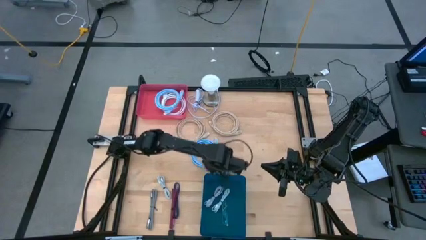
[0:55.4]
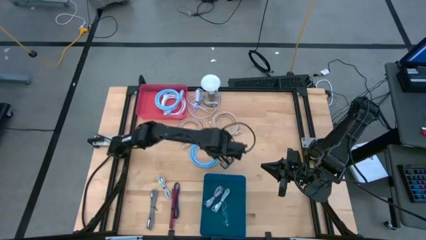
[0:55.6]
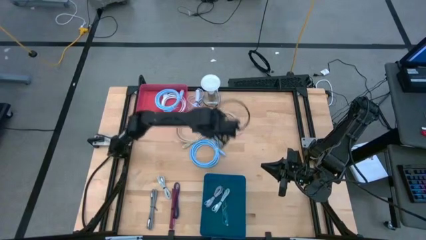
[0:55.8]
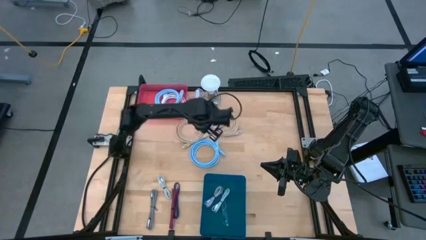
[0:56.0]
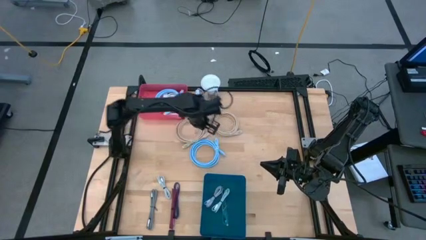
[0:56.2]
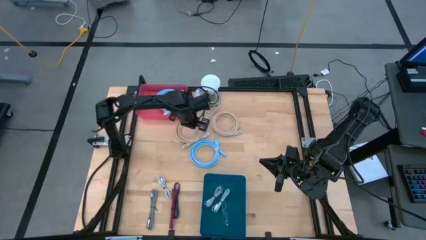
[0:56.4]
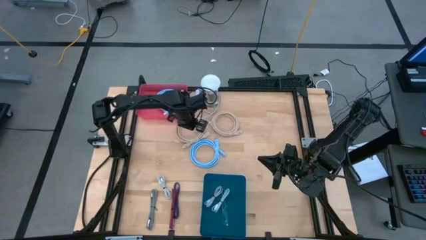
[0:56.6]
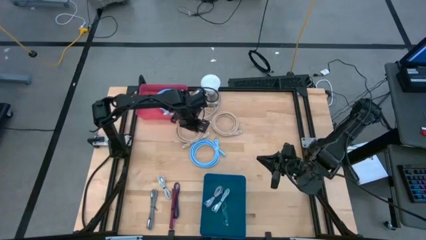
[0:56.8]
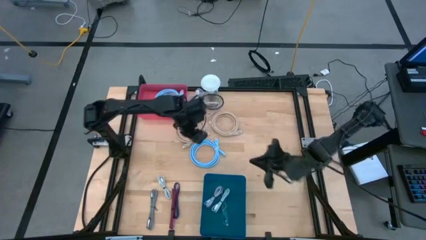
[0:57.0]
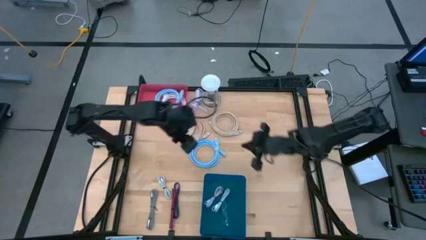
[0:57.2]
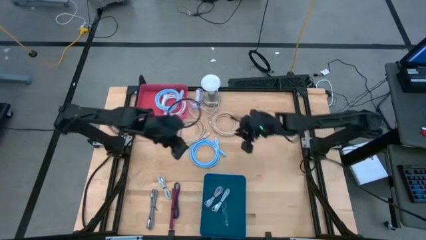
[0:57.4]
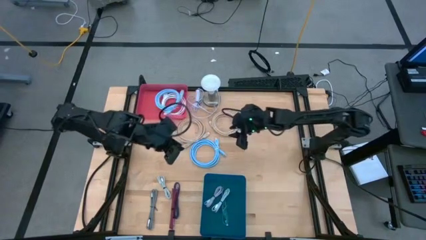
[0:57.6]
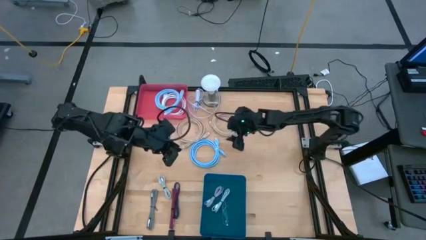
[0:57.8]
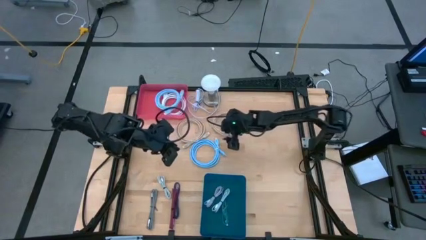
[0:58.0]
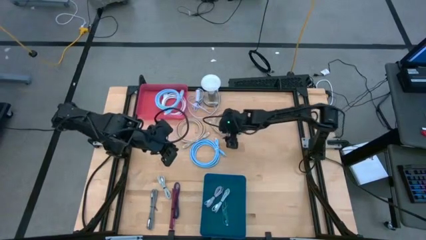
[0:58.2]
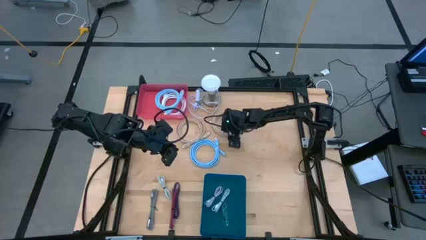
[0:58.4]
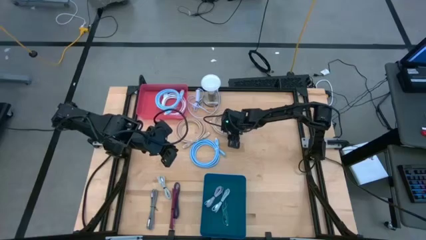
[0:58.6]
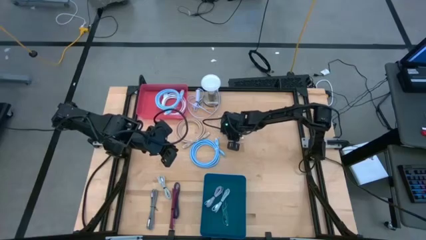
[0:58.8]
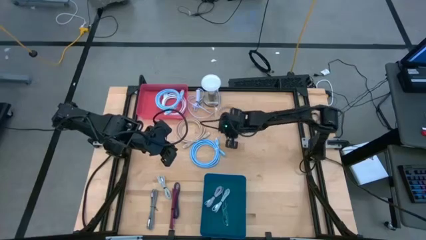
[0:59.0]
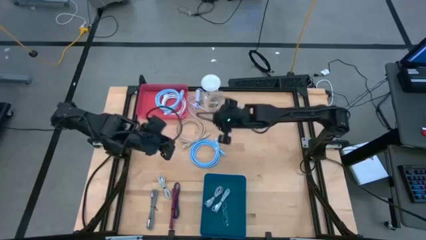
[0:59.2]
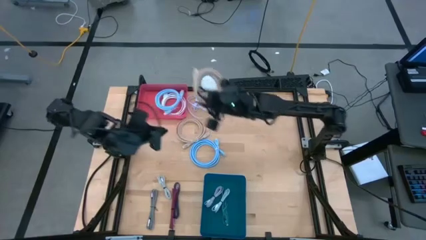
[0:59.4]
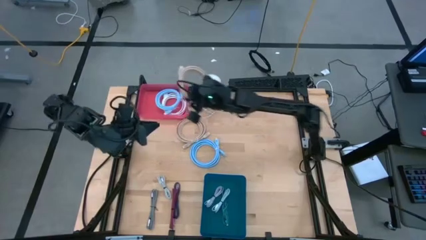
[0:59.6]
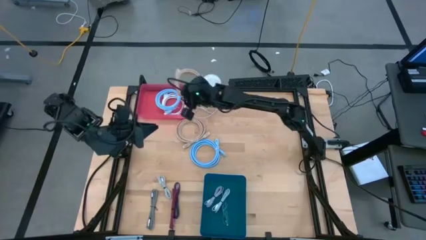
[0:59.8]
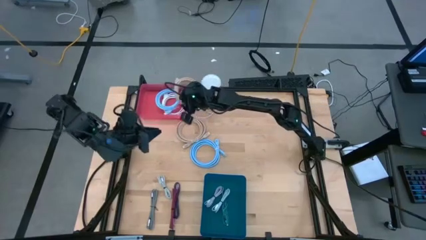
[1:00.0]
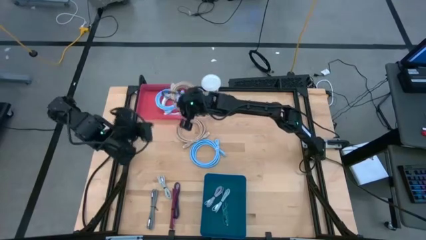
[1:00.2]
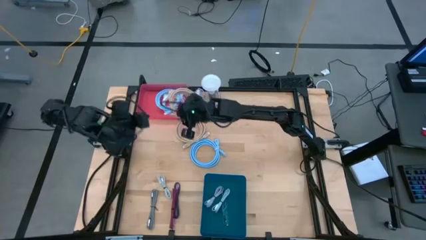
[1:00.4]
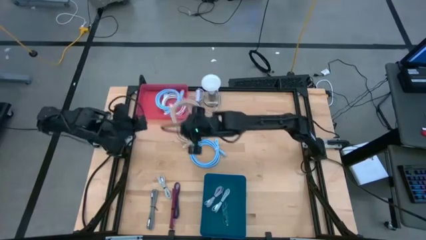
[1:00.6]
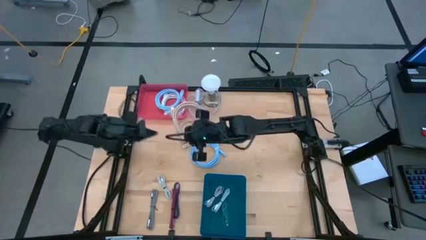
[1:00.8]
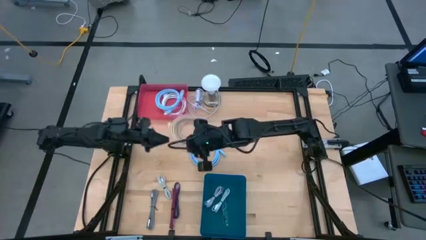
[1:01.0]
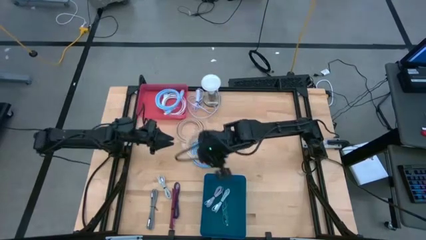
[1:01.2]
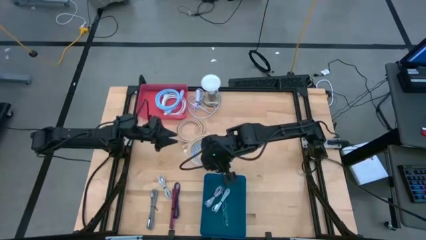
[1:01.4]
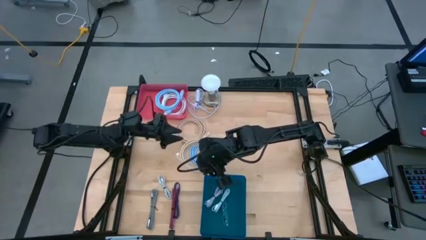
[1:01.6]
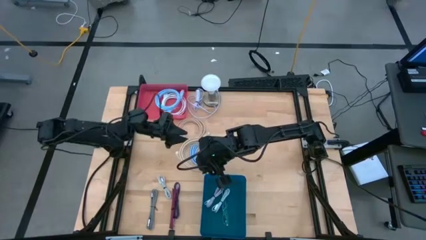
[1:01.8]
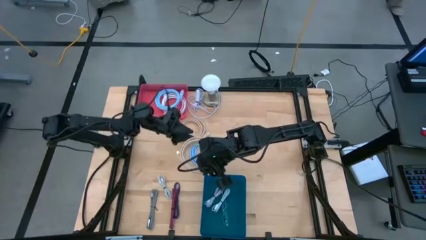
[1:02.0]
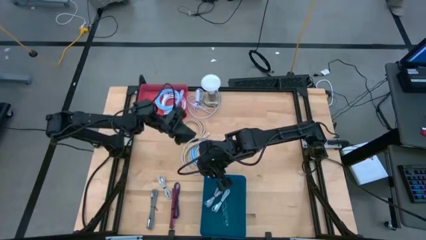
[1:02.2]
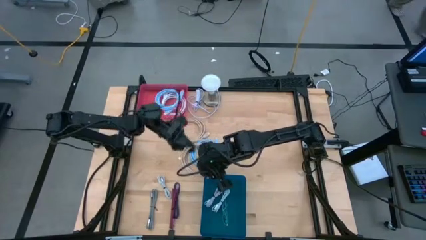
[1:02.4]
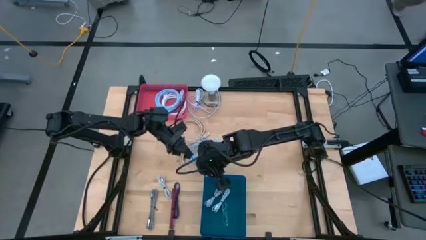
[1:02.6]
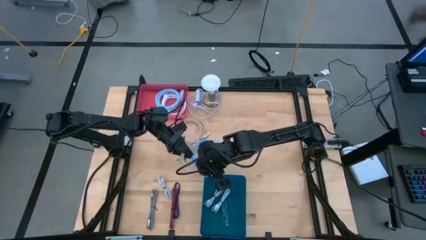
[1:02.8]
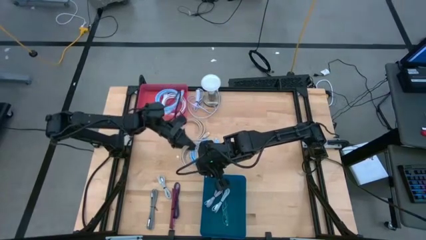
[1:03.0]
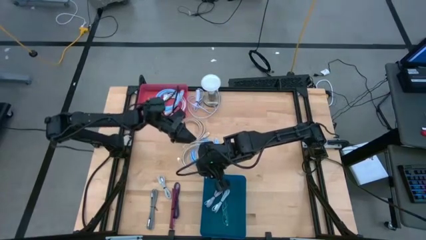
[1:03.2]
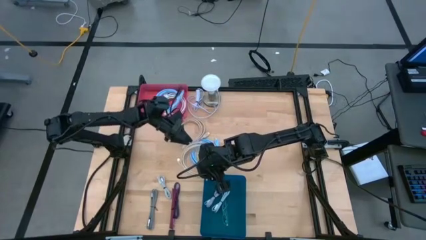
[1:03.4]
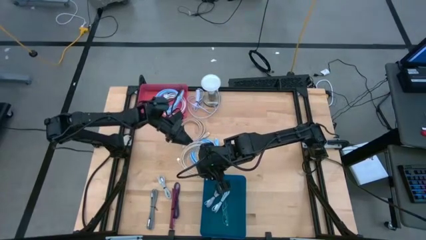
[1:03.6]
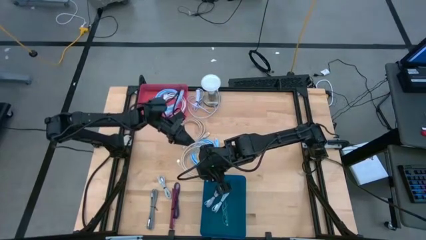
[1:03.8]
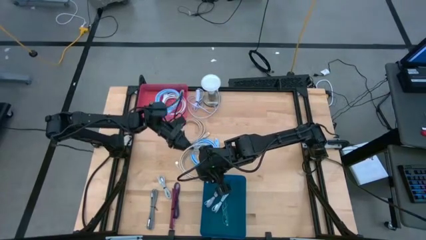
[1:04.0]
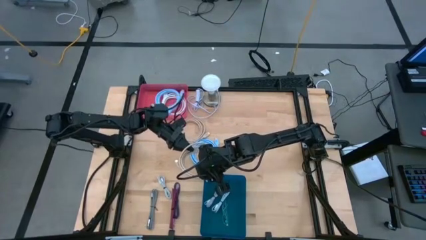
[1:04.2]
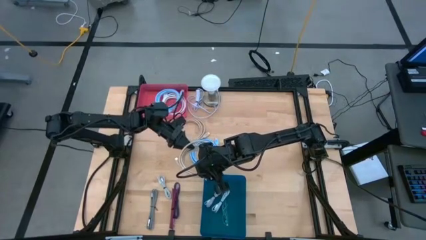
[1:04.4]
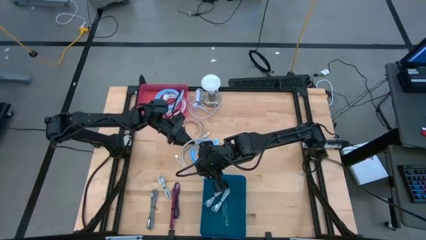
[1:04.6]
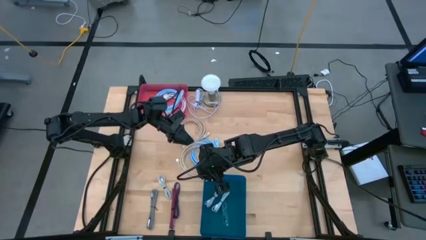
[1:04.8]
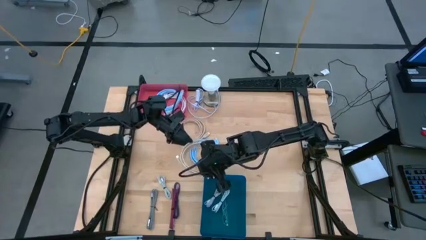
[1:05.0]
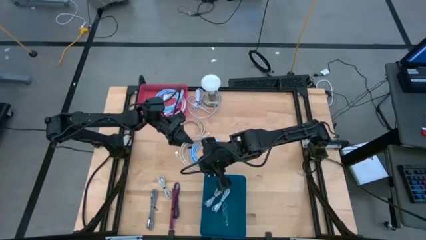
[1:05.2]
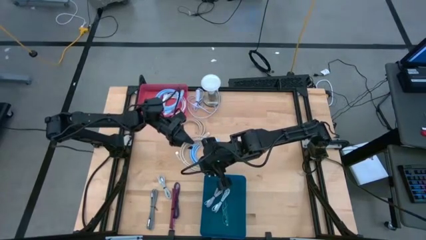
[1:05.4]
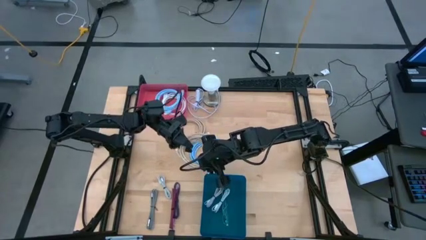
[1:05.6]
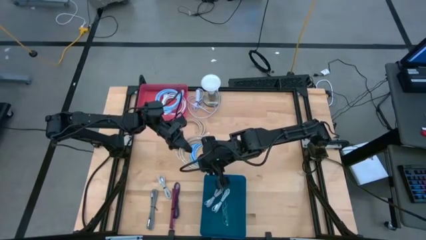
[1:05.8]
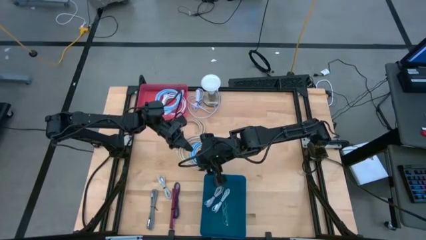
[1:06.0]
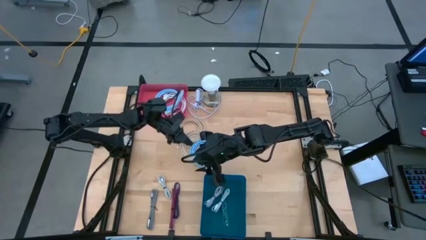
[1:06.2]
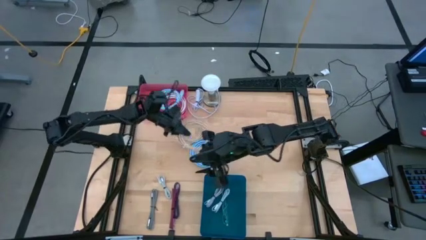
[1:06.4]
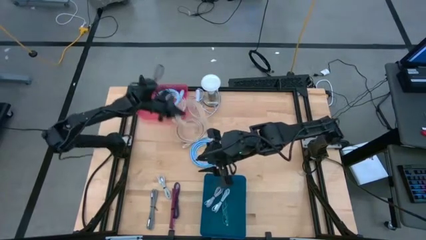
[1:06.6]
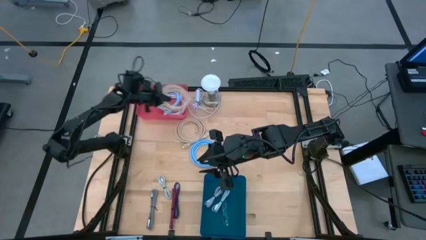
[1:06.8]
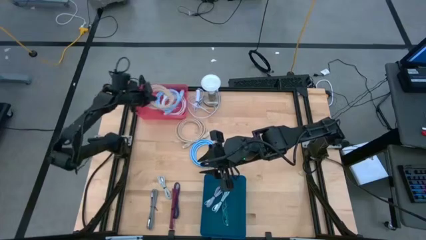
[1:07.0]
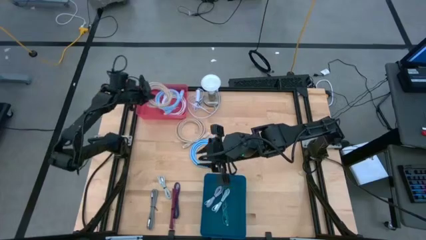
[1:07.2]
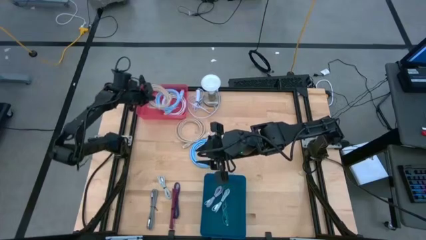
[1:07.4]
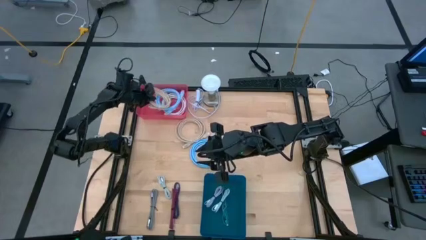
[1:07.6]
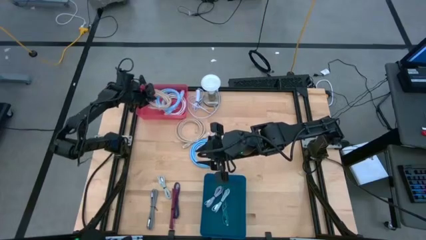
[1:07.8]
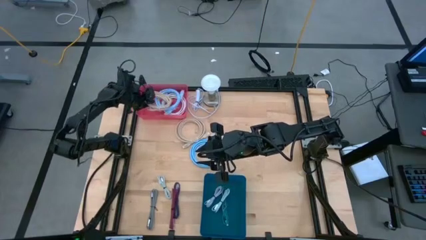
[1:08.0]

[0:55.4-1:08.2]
Task: Pick & Place USB Port
Put the right brown HDMI cable into the red bin

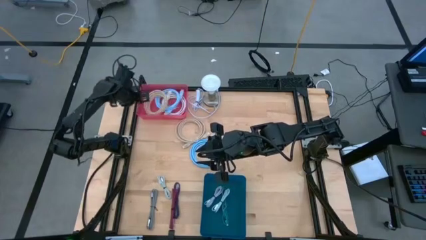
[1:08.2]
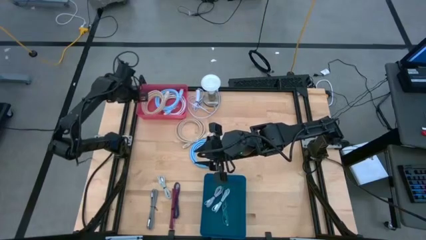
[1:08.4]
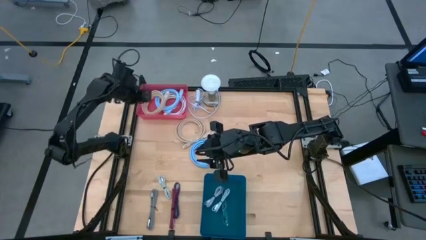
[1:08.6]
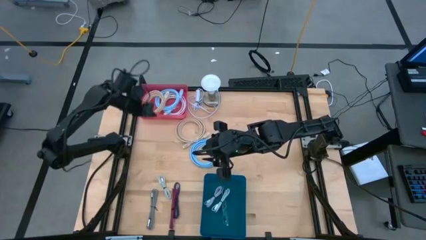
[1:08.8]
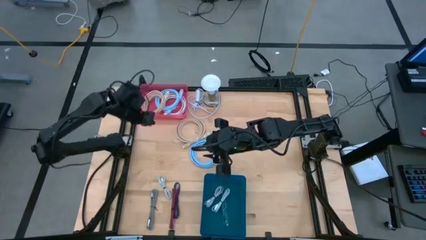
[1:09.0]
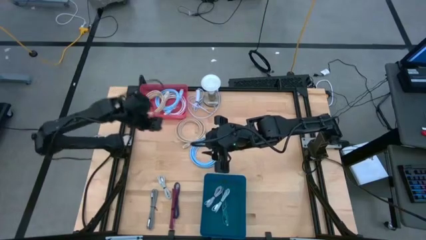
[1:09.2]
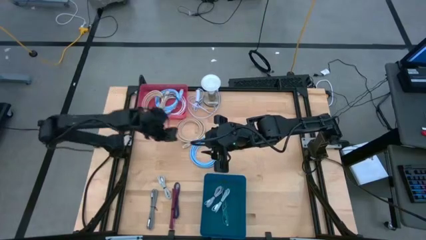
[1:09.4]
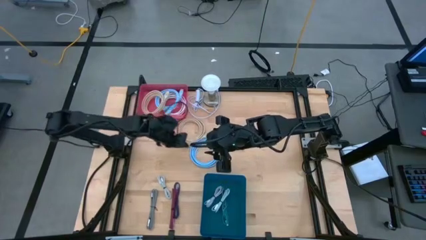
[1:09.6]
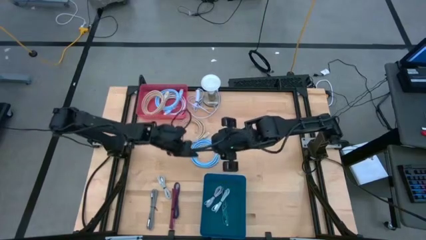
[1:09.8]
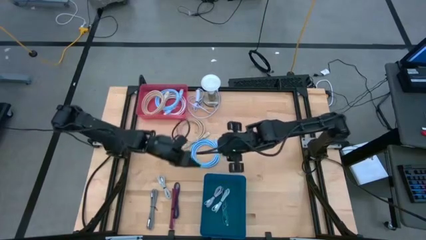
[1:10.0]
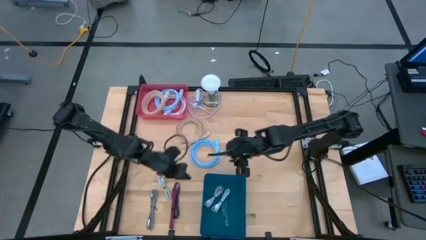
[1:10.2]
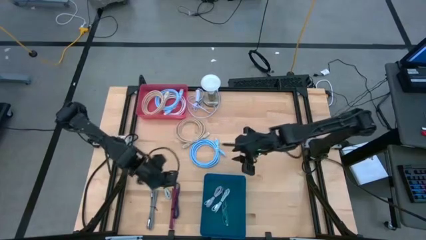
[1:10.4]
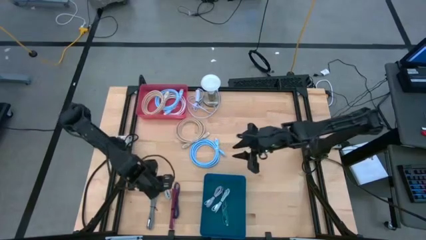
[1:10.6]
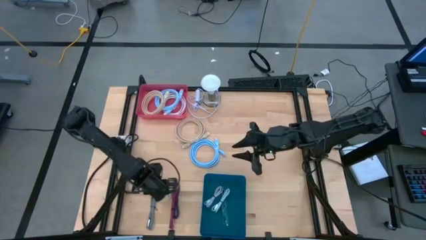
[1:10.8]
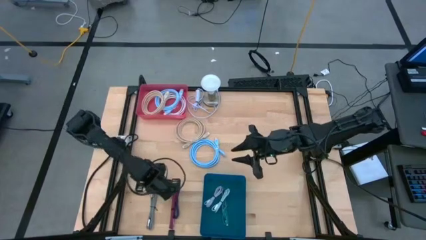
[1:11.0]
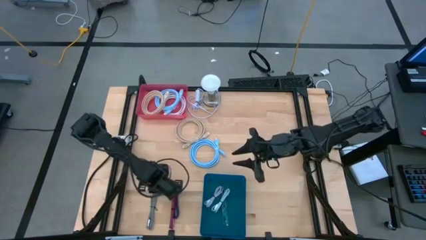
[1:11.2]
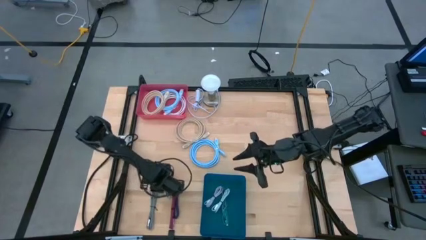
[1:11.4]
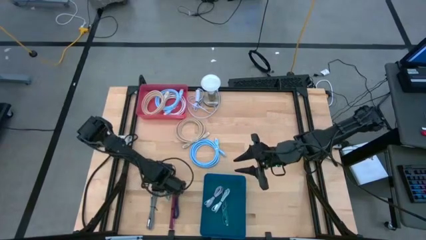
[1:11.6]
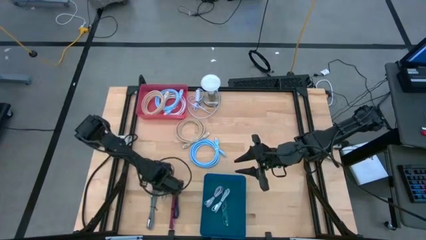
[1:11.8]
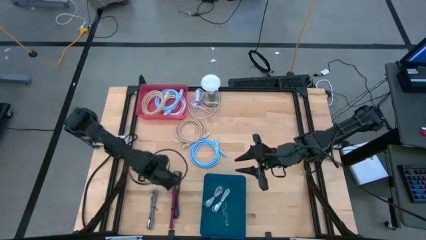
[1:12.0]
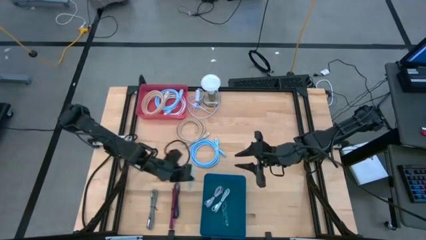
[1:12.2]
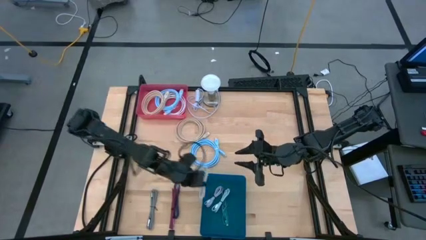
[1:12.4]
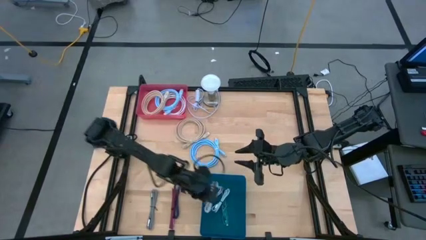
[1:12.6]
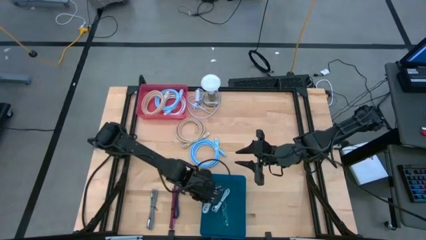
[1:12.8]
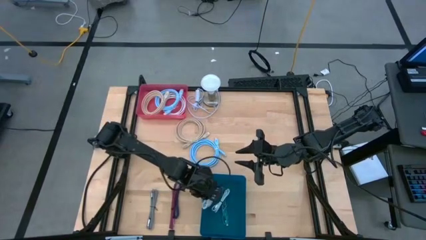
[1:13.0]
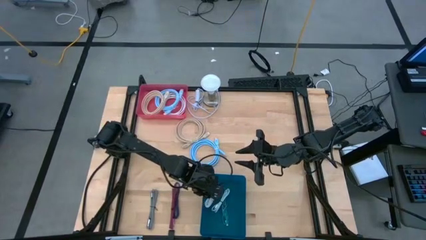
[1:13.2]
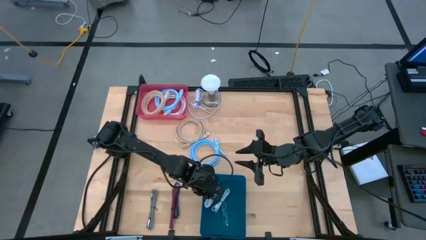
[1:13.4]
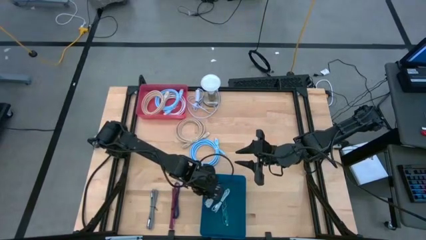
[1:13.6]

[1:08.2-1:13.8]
Put the white USB cable into the blue bin
